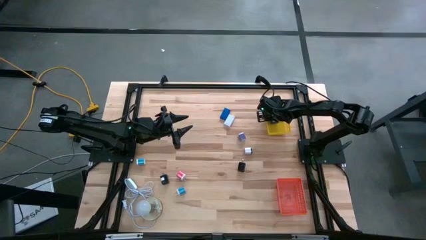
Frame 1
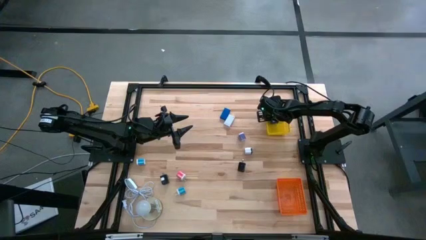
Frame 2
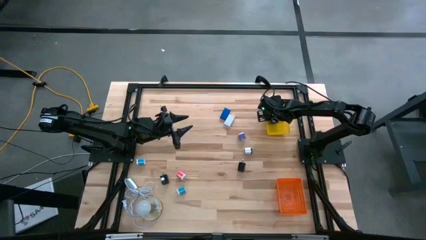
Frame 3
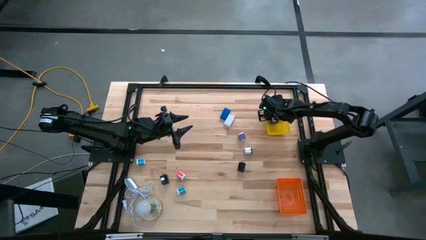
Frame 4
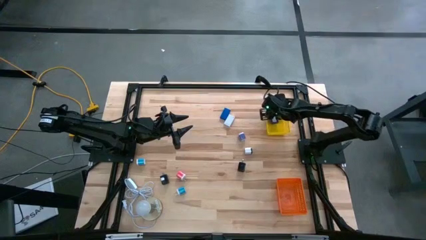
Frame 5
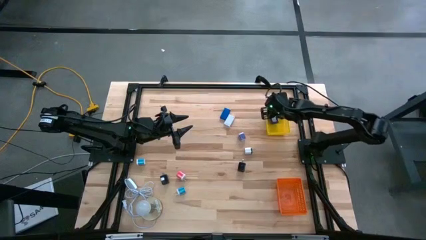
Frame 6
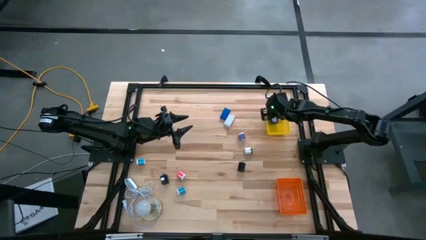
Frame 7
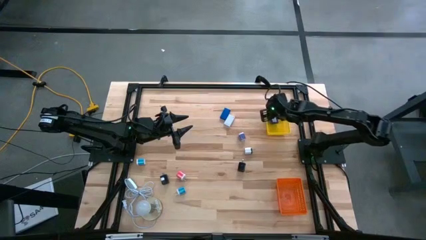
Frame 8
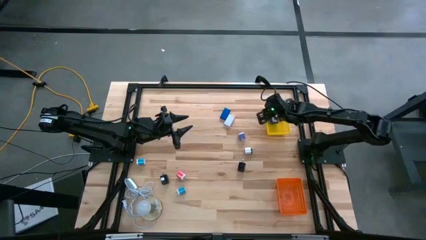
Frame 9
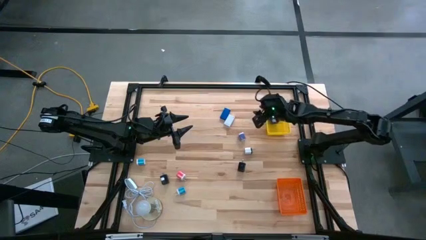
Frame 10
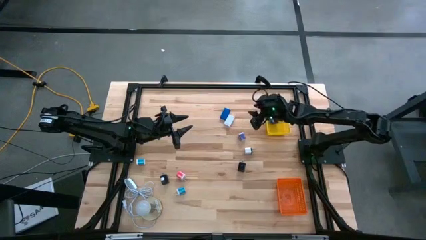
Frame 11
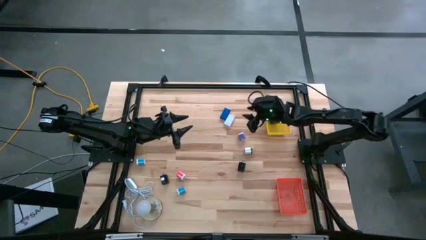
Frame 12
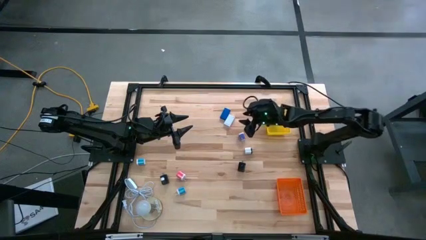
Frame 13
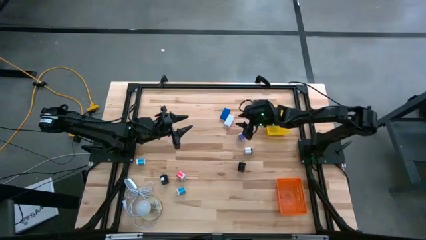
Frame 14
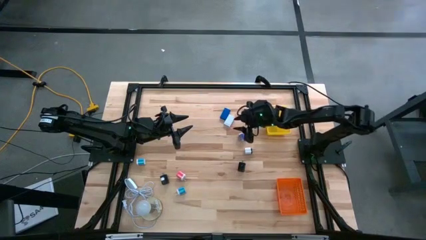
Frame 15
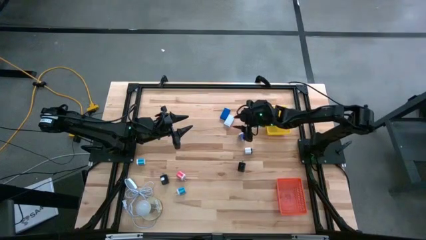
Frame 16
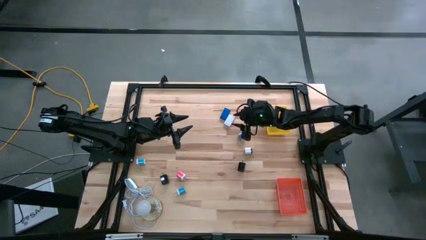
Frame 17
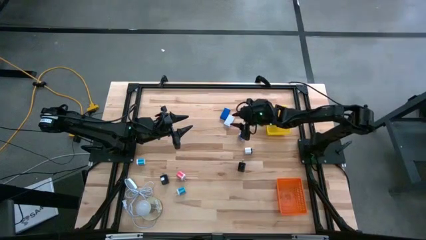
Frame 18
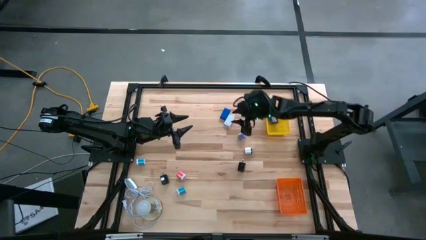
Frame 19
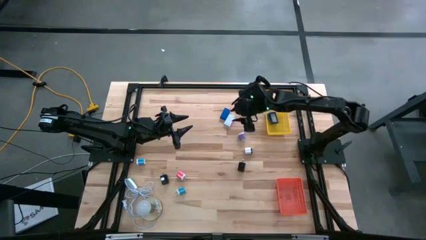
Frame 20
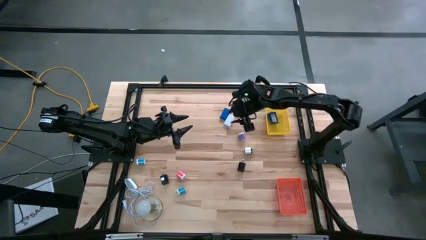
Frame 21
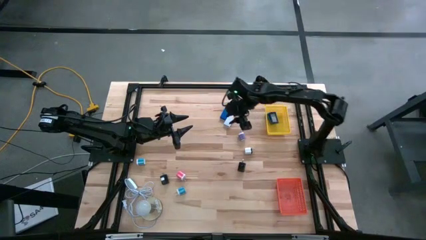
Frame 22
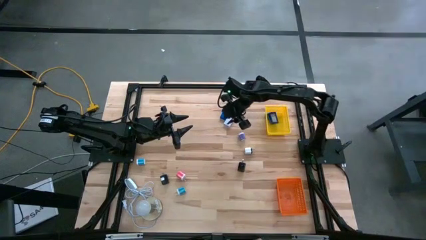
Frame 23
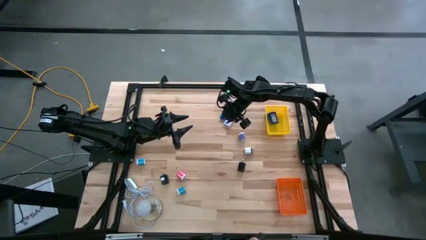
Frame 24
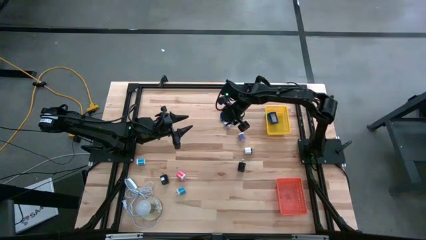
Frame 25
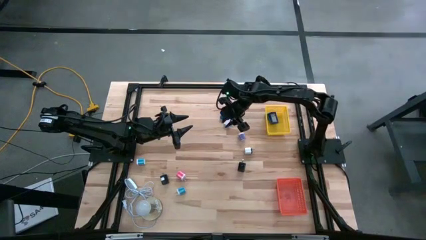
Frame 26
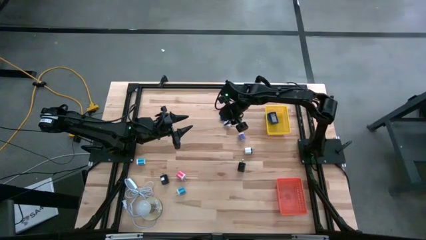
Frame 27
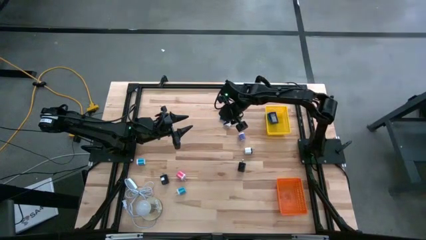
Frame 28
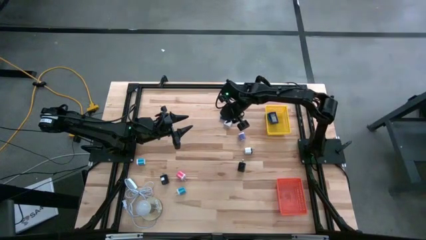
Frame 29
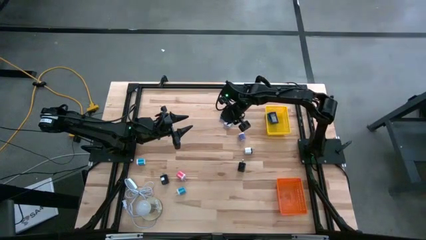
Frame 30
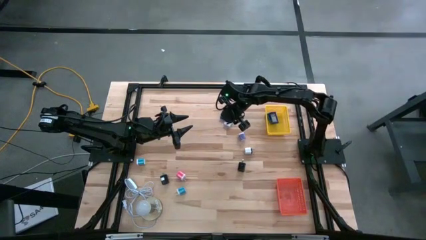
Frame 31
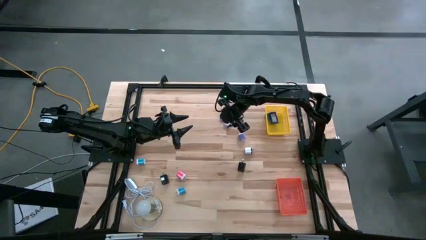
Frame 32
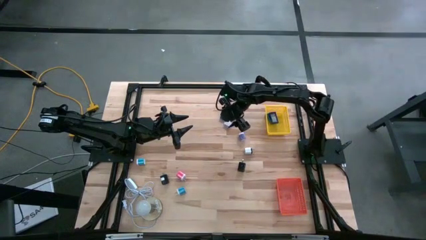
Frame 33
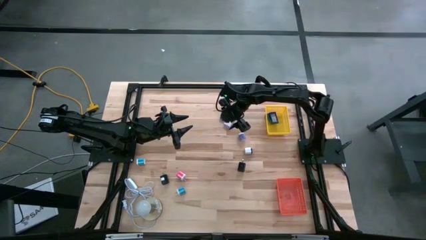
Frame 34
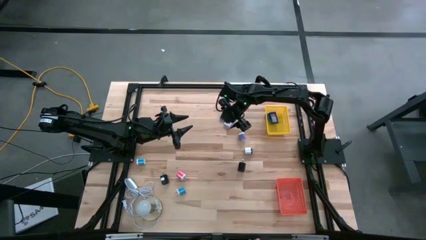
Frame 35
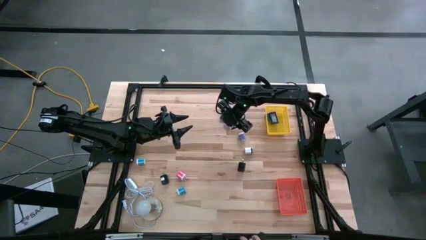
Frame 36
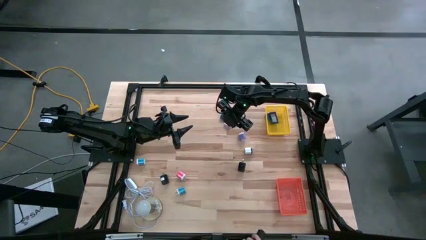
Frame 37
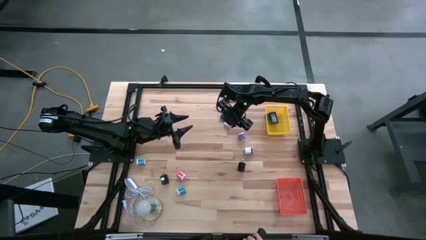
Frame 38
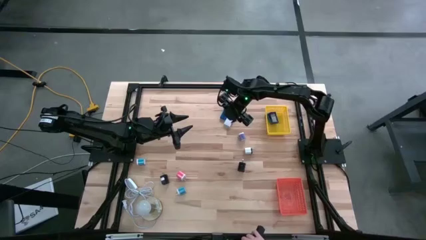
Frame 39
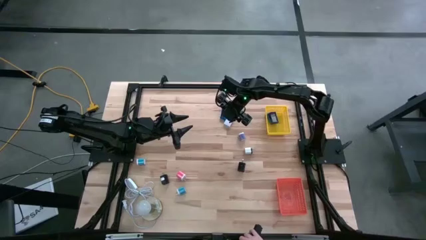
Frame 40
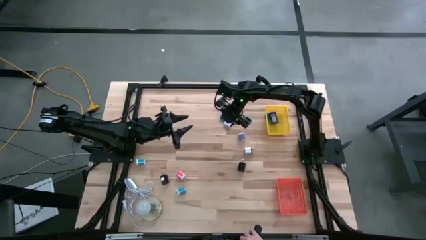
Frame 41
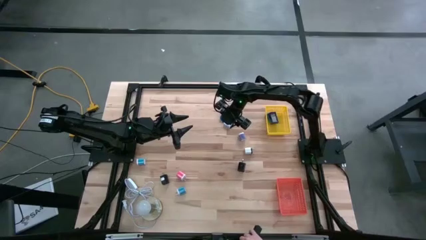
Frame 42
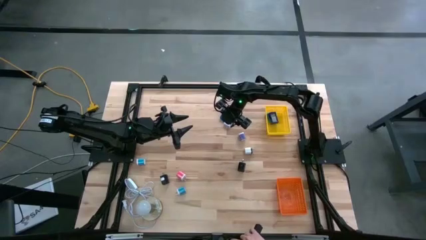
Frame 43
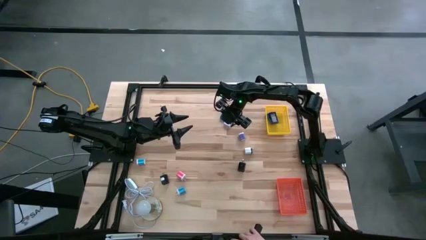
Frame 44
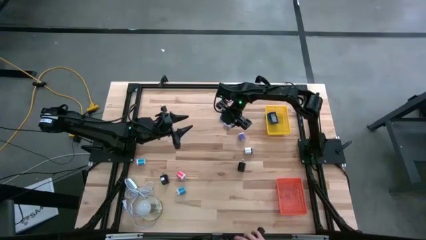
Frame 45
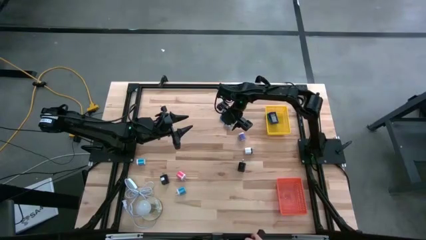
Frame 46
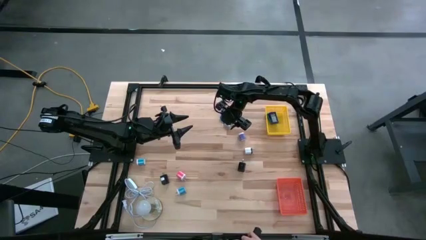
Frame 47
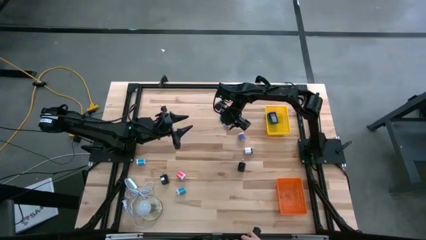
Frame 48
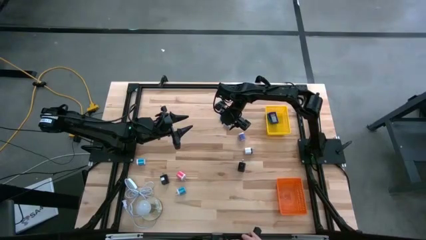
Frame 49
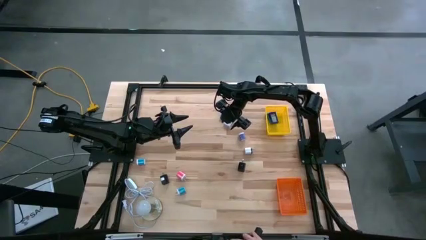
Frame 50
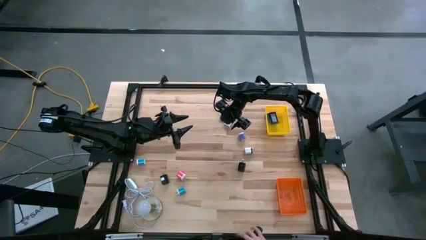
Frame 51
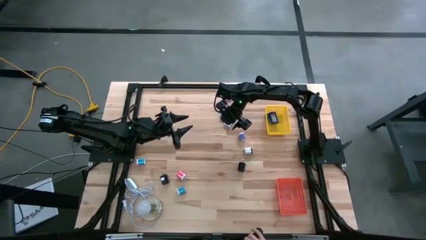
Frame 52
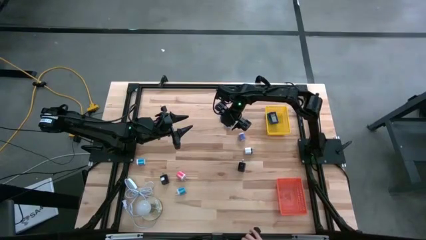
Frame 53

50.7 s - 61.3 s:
Task: Pick & Place Office items
Put the white digital clock into the yellow bin

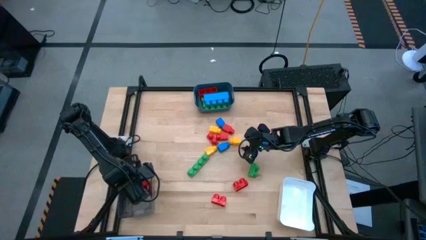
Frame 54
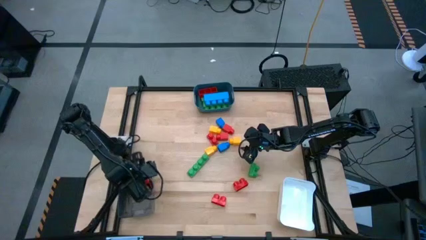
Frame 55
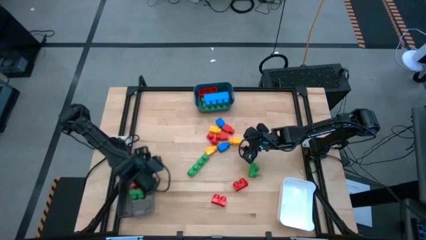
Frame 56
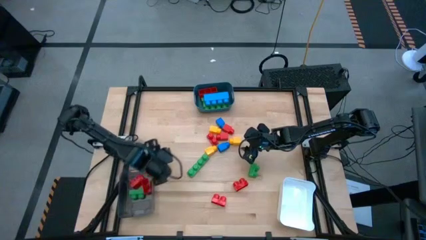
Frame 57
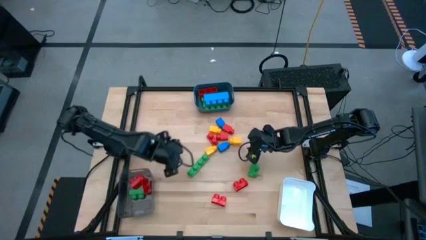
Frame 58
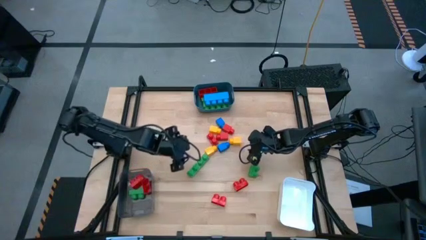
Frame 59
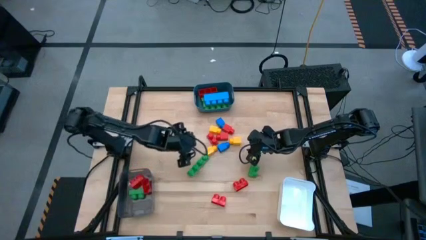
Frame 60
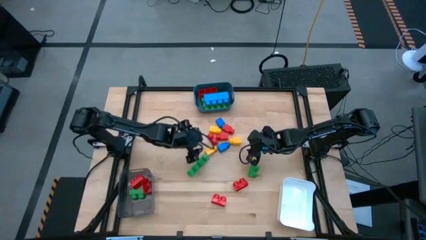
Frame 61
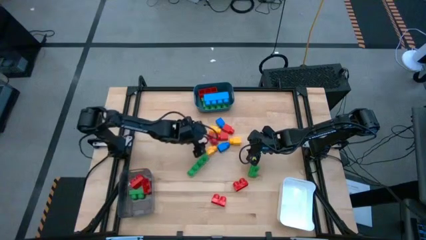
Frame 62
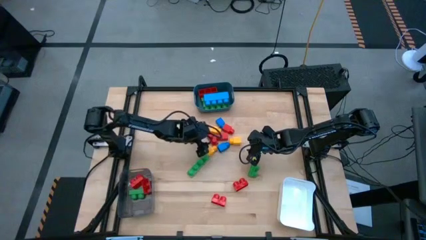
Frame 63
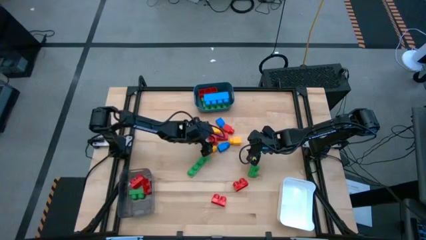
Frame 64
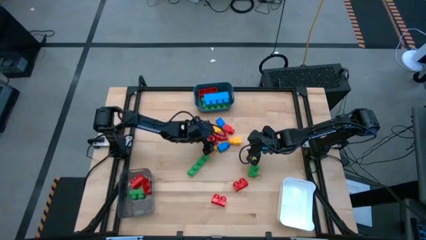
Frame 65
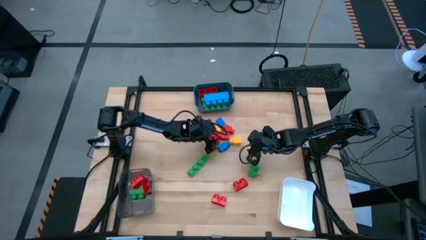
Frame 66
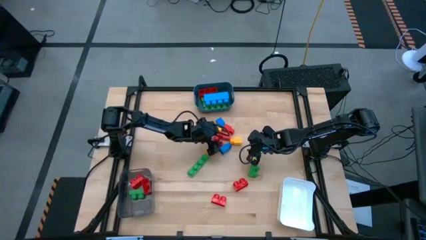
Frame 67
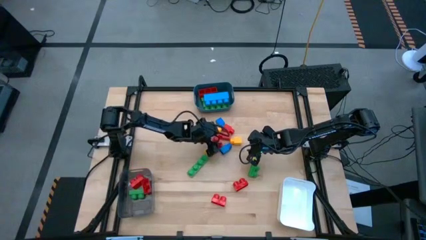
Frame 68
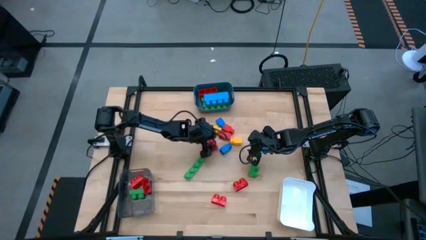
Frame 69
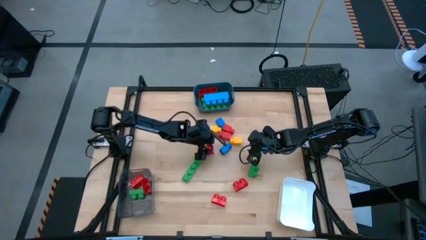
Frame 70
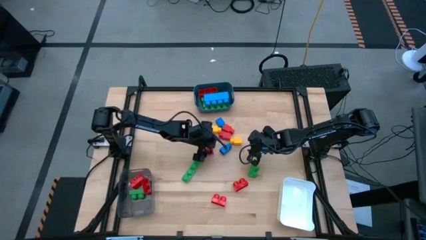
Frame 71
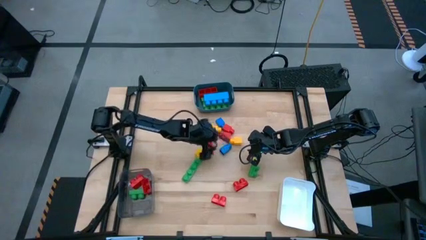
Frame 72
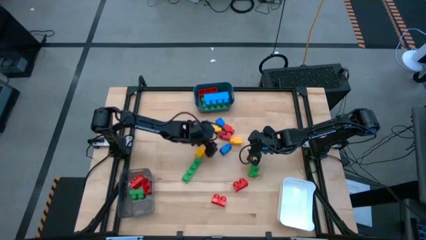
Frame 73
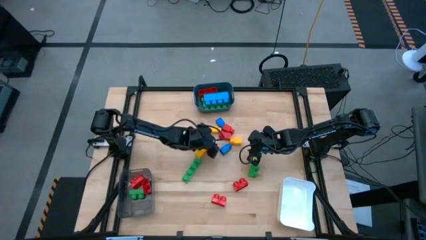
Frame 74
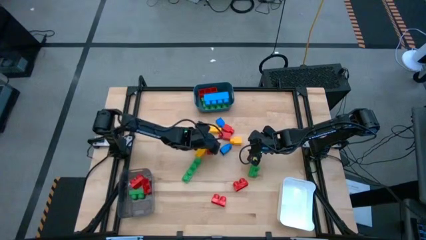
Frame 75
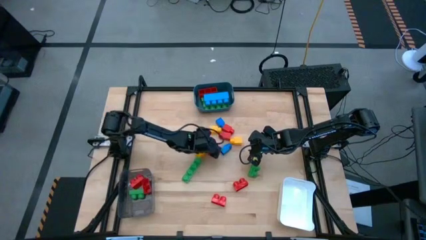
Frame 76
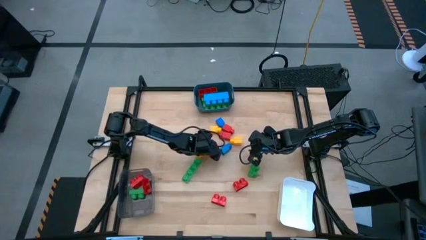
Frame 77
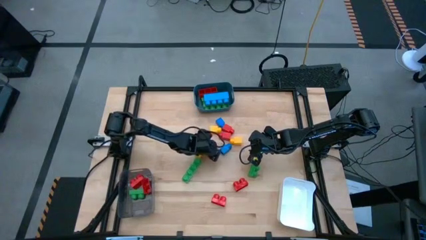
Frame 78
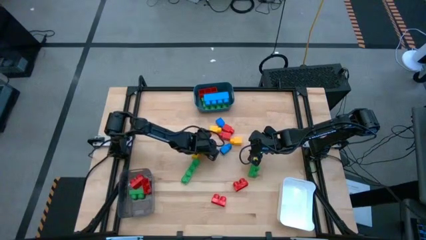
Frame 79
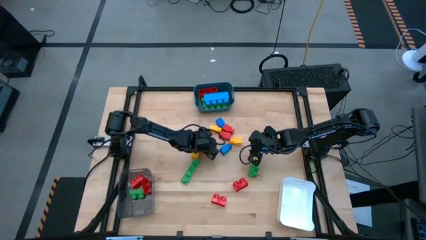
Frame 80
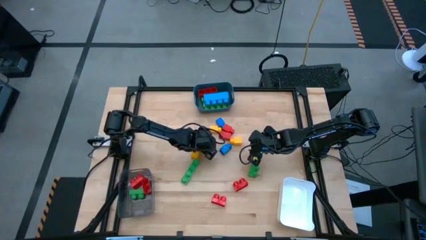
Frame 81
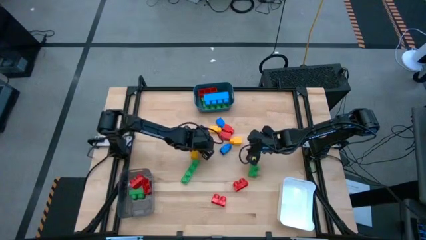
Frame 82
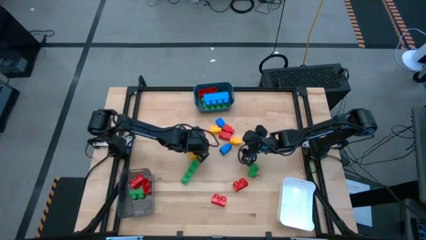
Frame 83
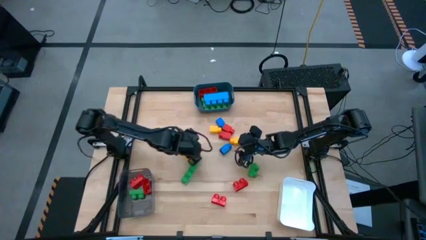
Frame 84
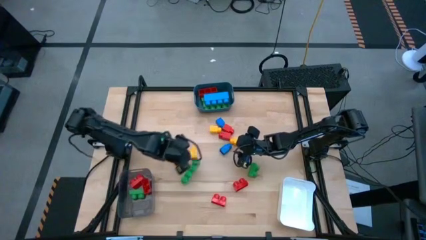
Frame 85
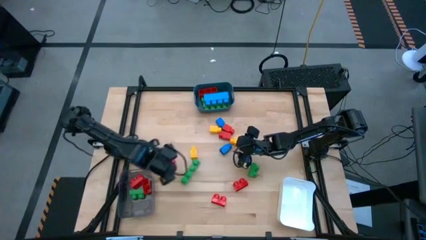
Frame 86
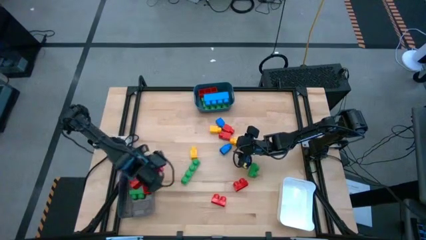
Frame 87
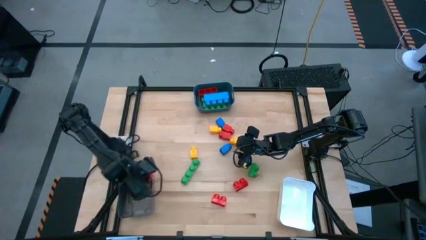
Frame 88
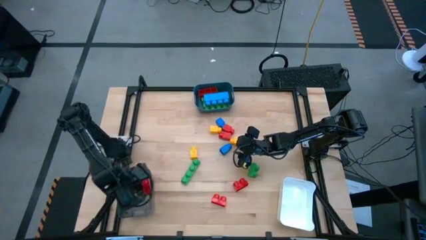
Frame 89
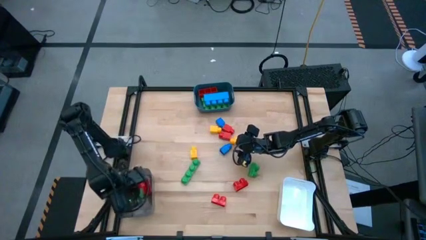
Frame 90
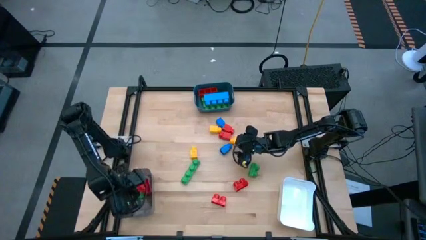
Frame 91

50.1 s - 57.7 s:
Task: Sort blocks by size
Put the red game piece into the grey container
